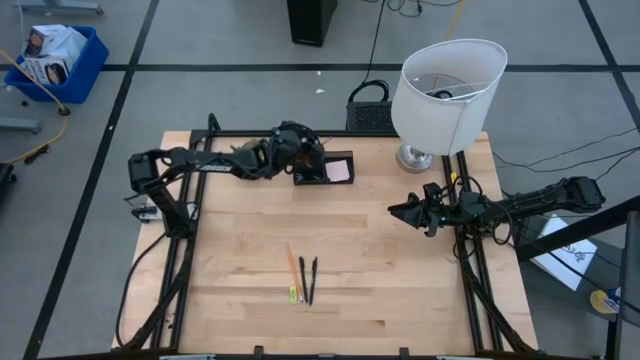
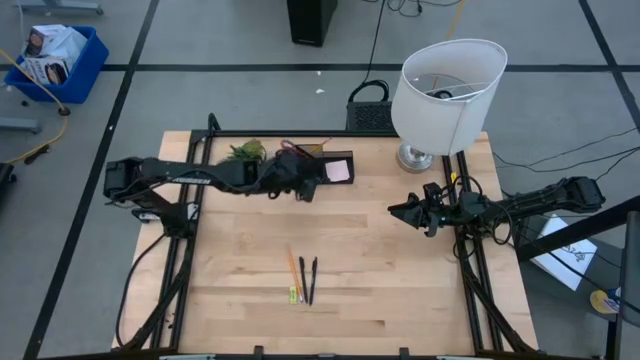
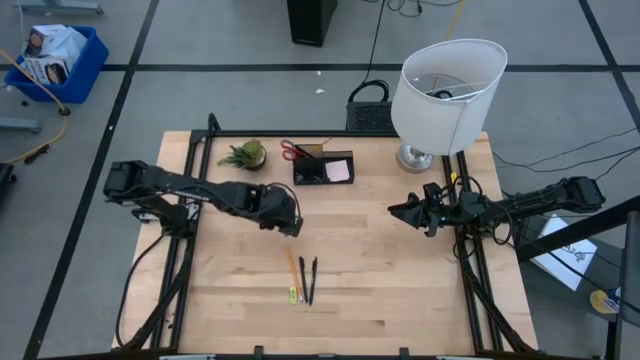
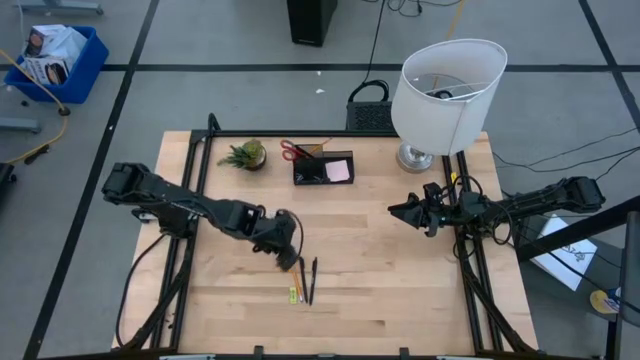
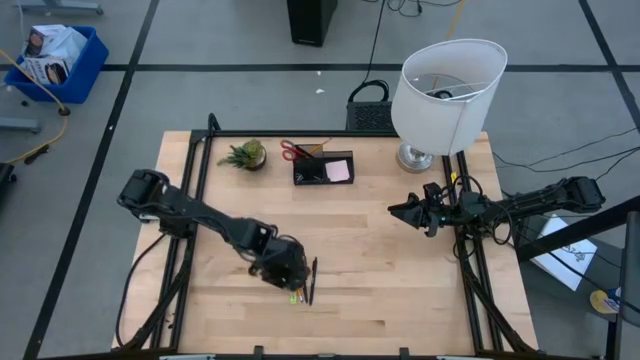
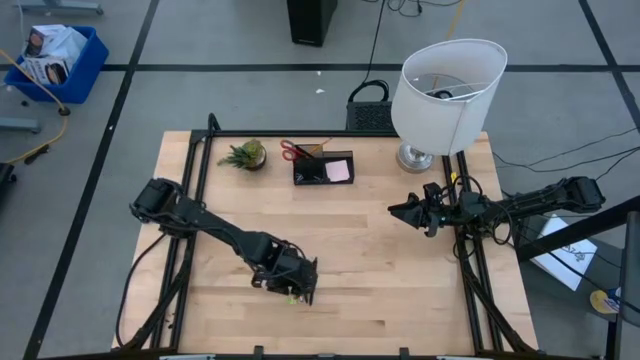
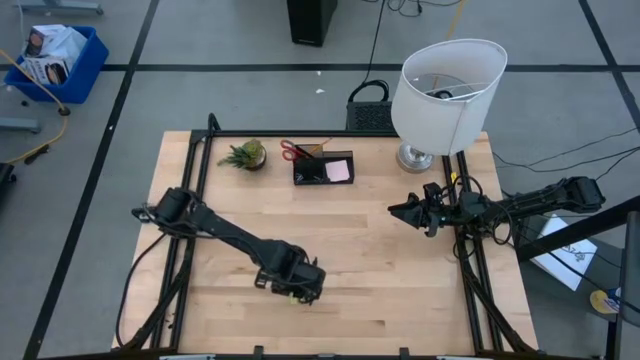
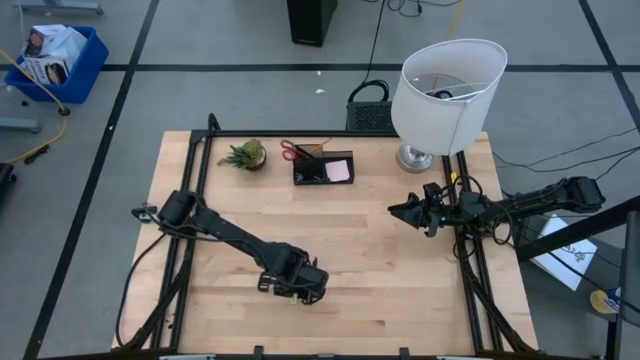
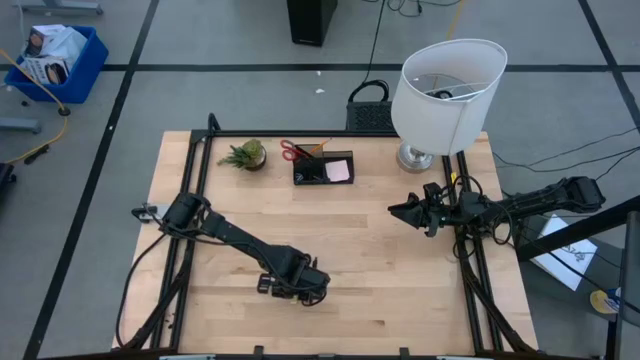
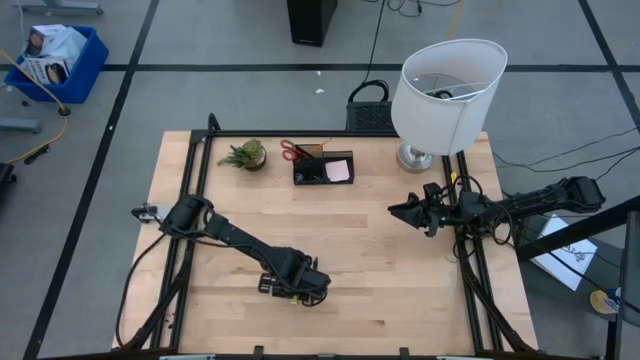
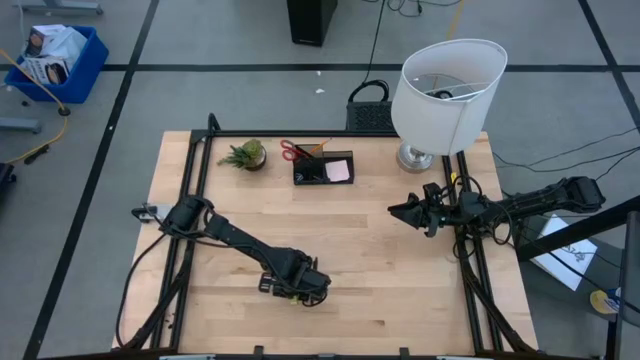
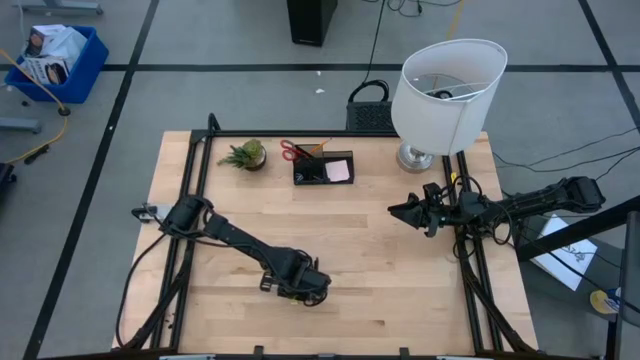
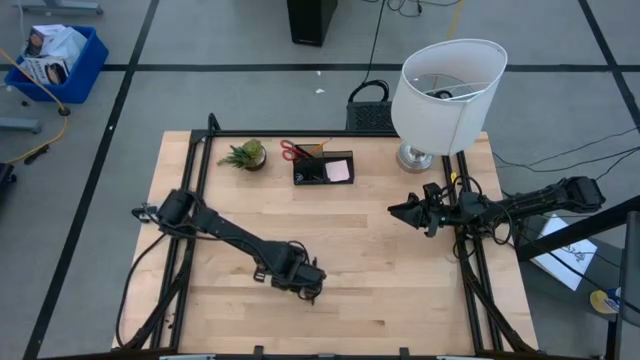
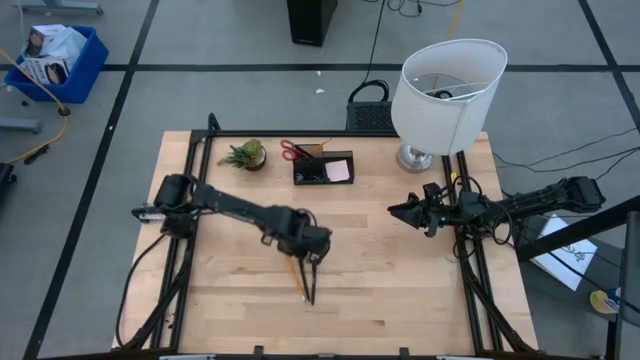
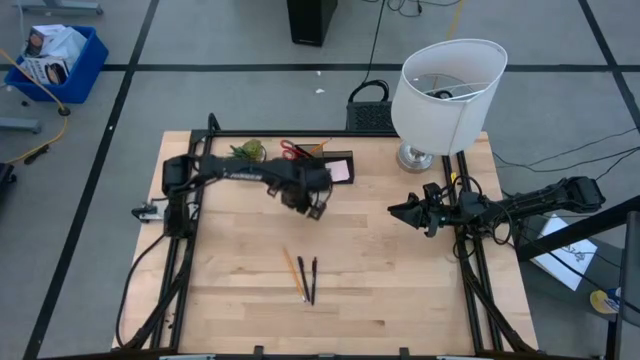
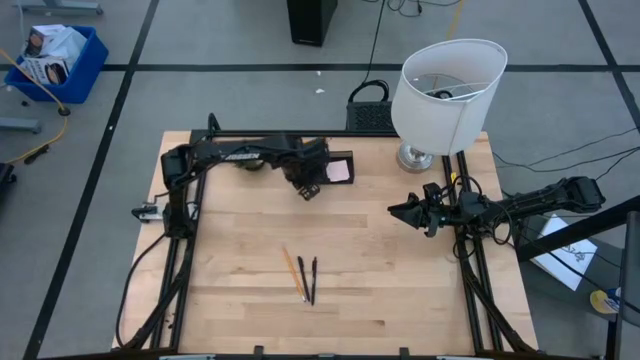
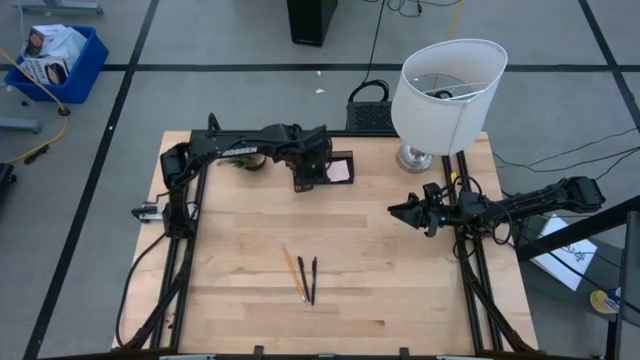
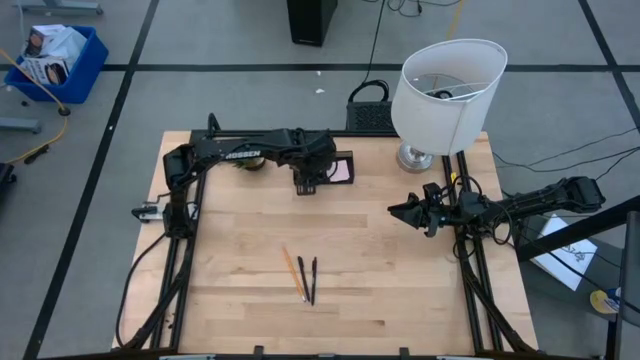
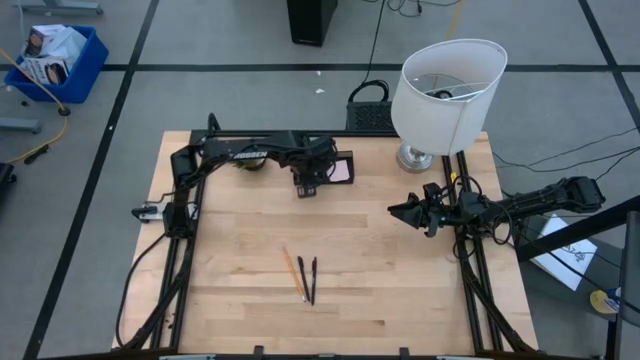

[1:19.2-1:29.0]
Task: Pick and place office supplies into organizer
Put the yellow eraser into the black desk organizer

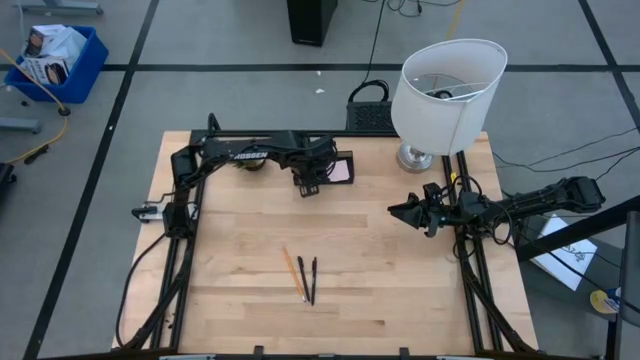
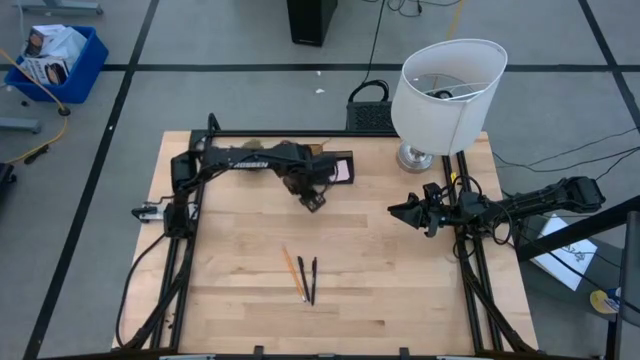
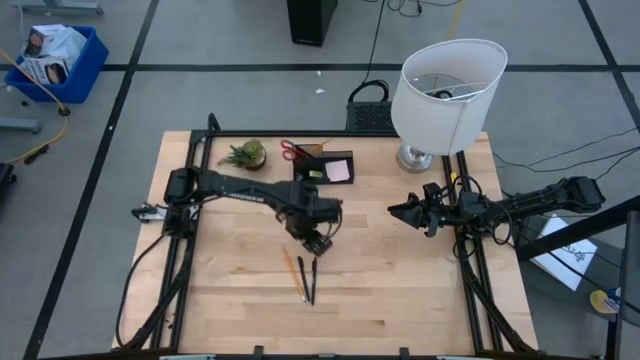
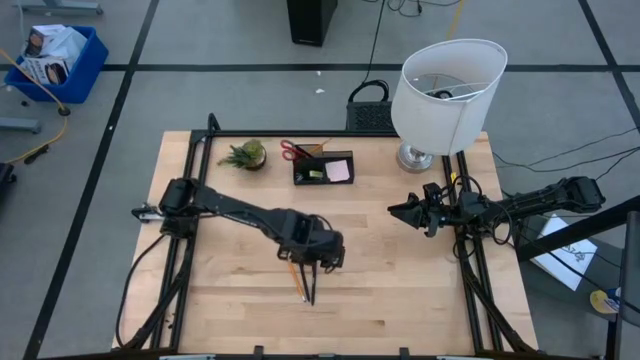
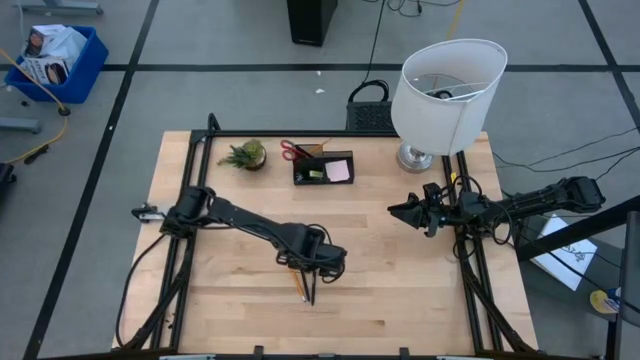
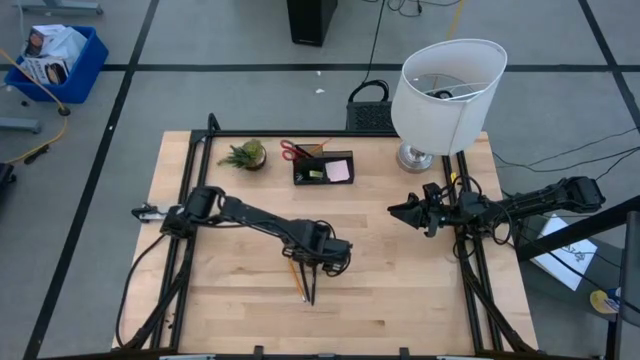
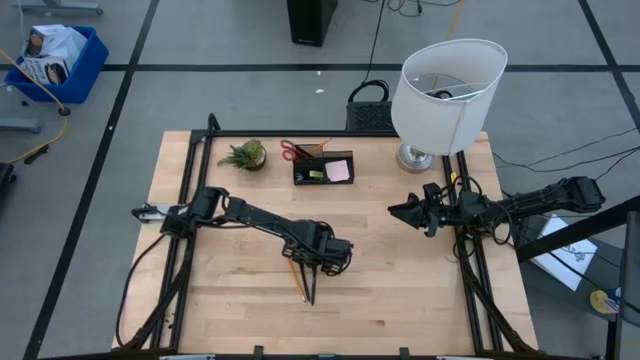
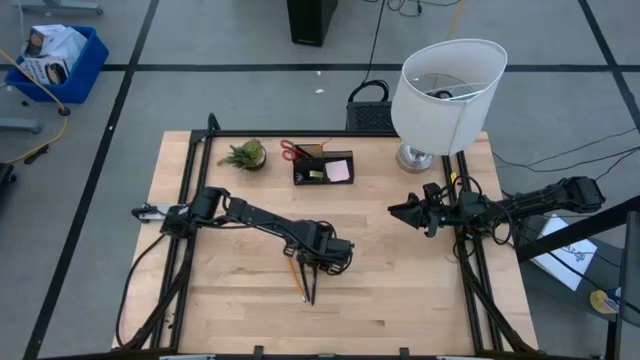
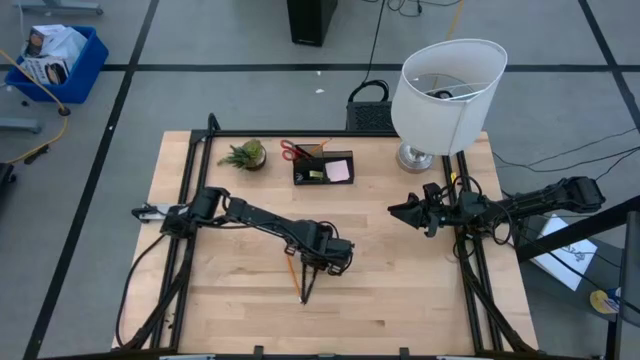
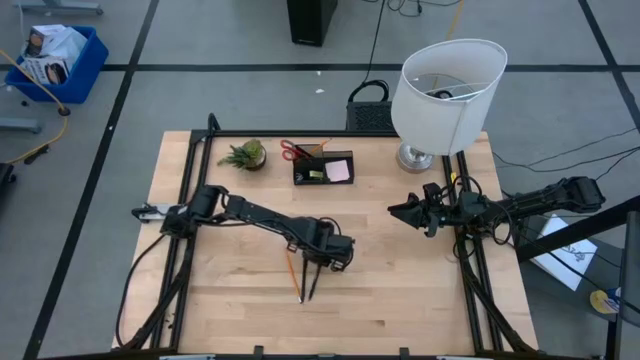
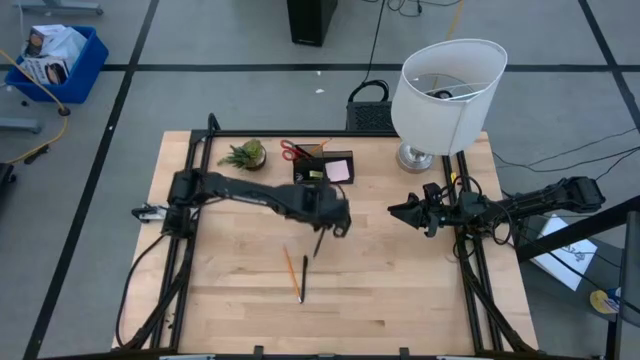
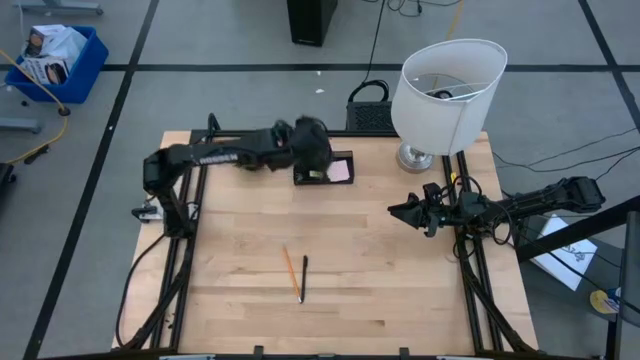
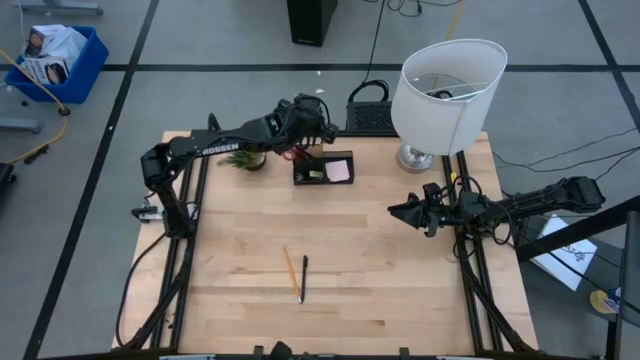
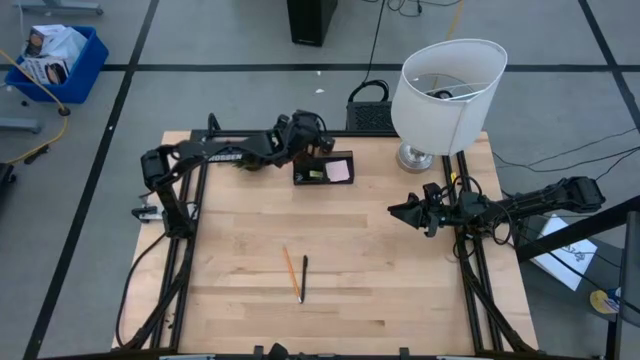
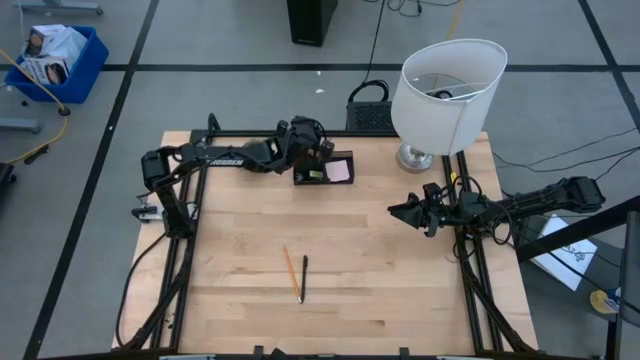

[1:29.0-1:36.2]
Put the black pen into the black desk organizer

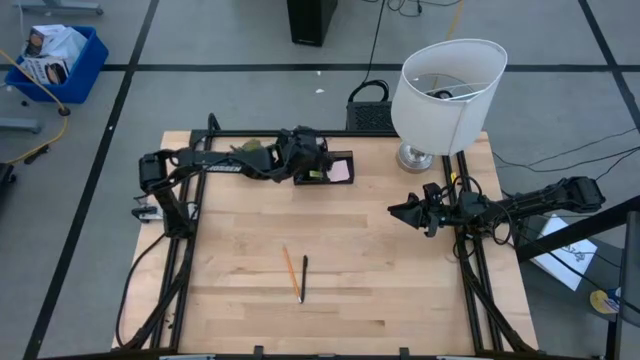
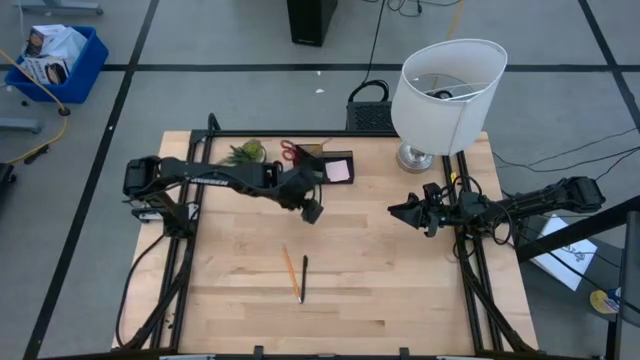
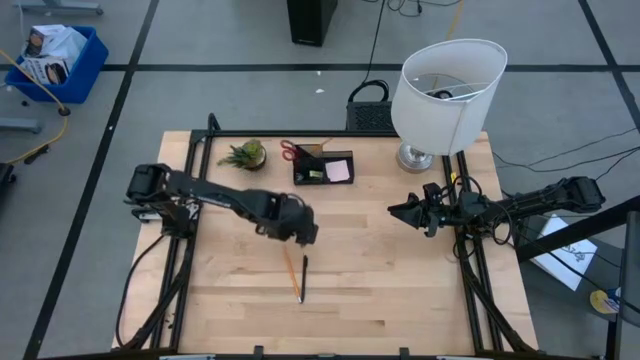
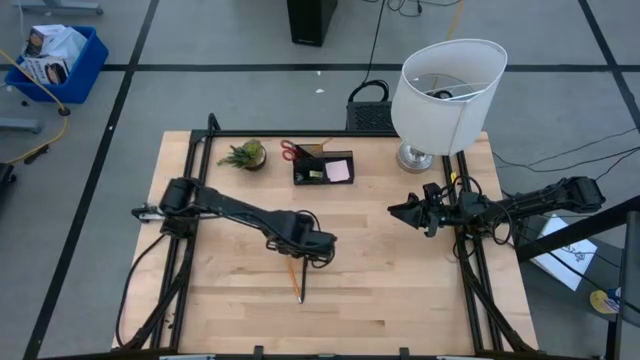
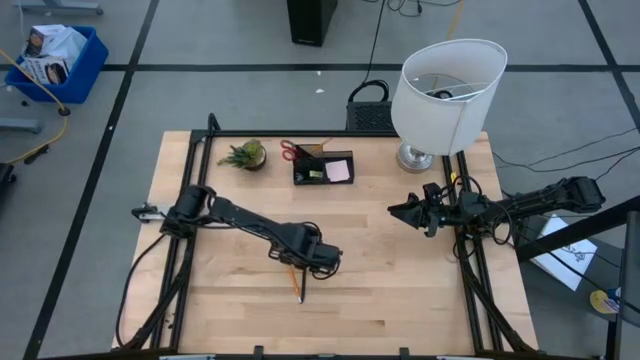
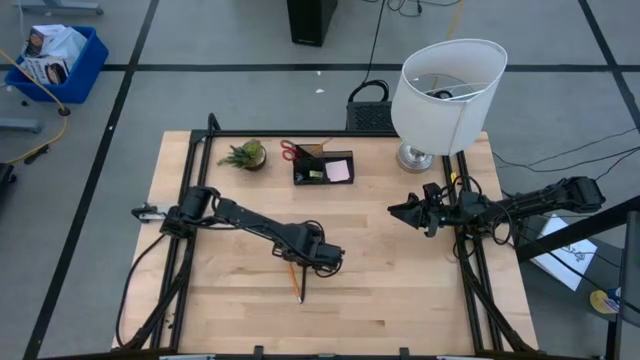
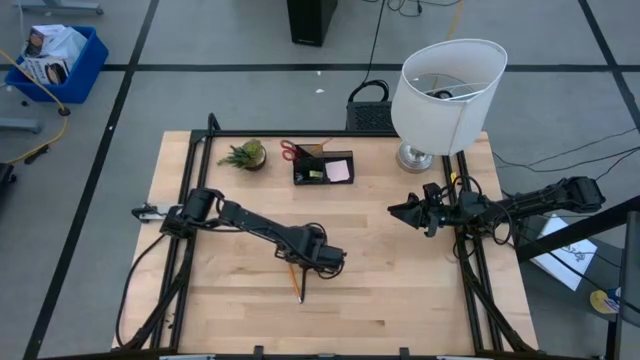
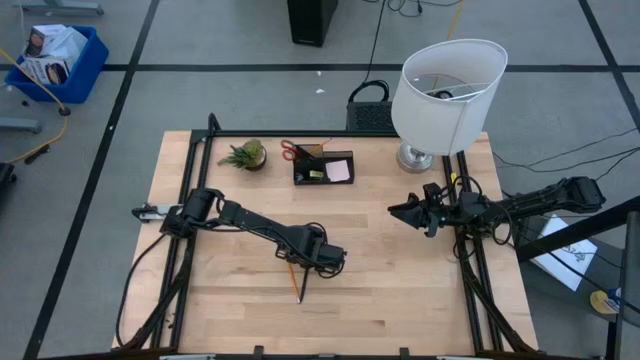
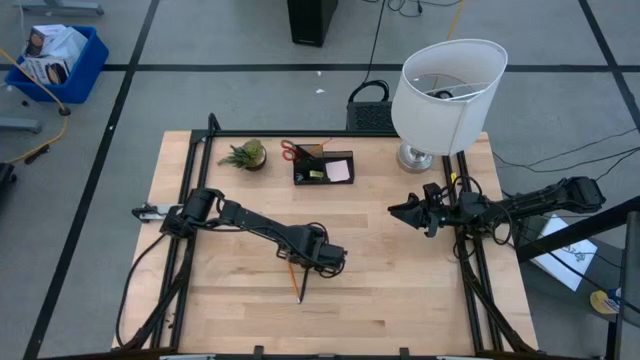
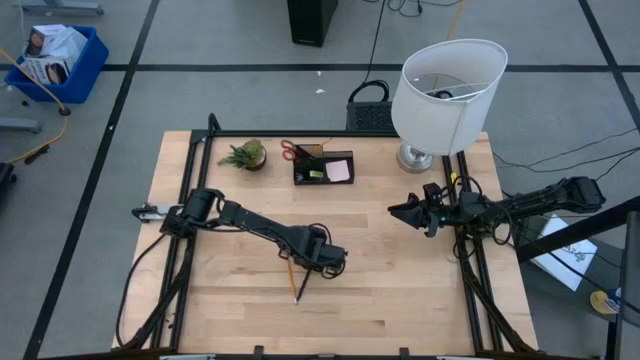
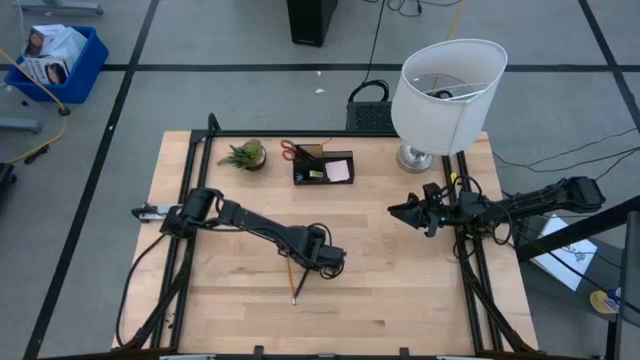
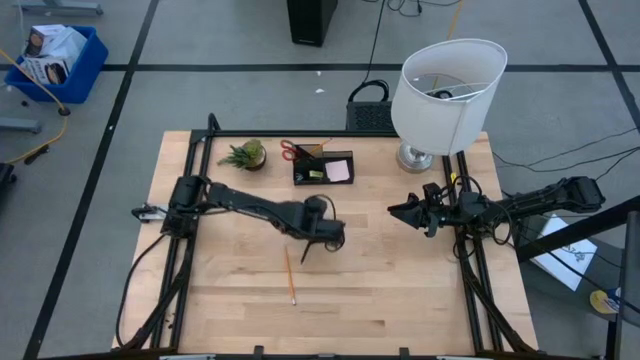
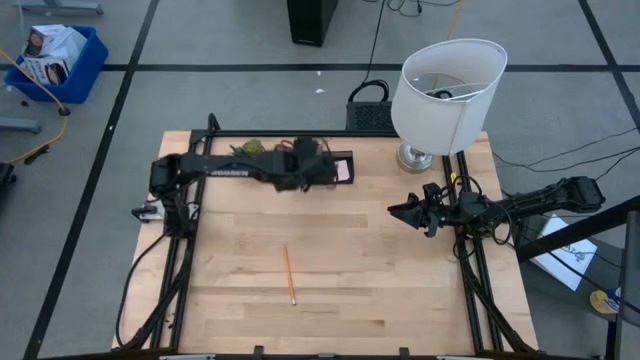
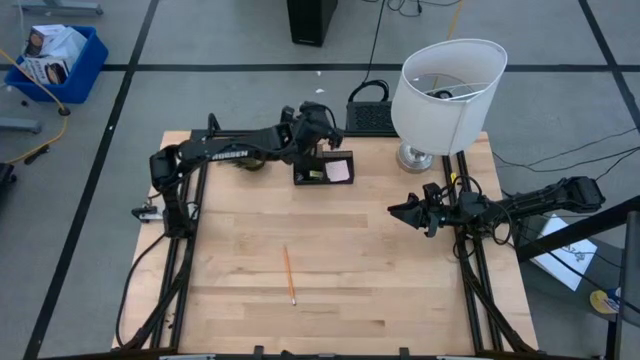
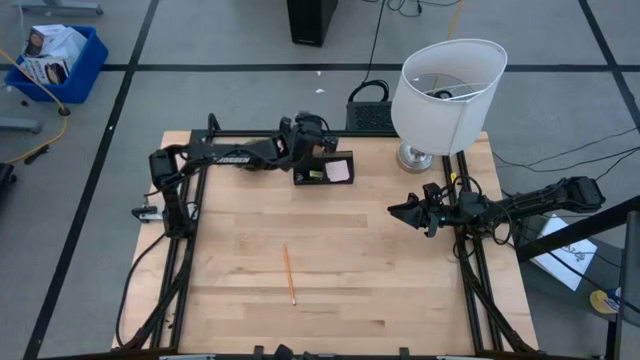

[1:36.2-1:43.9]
Put the black pen into the black desk organizer
